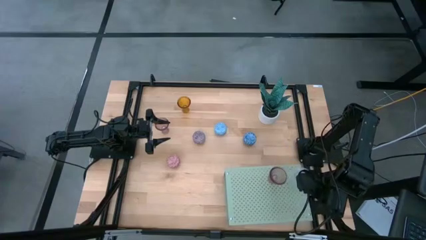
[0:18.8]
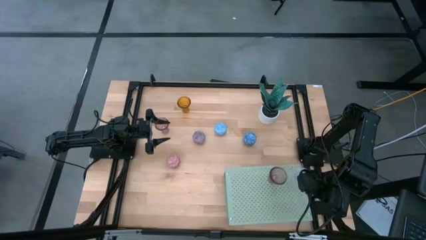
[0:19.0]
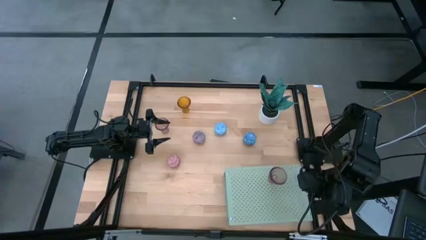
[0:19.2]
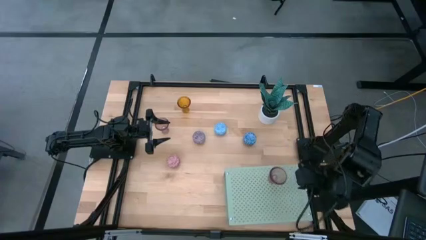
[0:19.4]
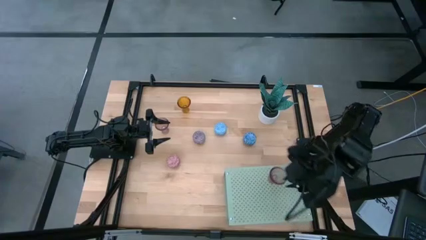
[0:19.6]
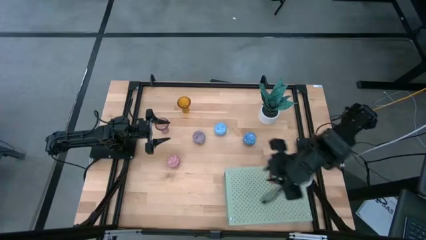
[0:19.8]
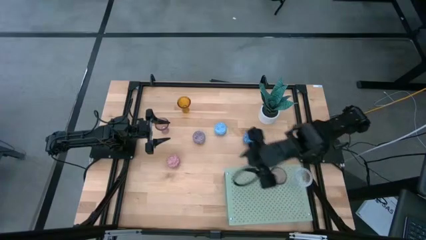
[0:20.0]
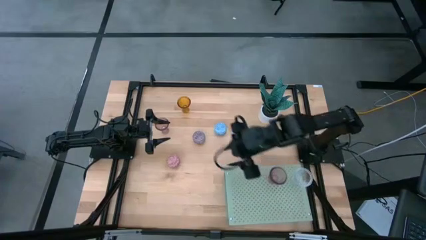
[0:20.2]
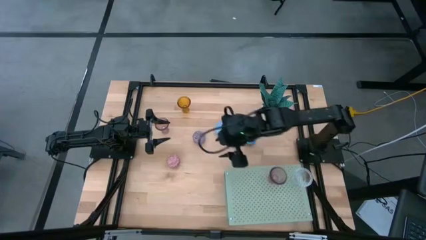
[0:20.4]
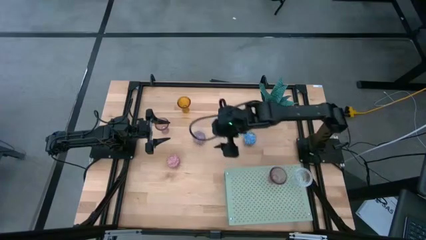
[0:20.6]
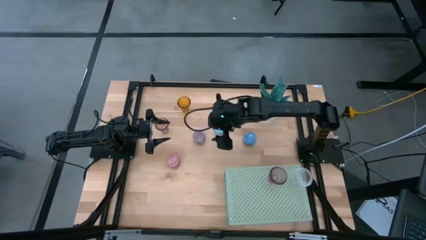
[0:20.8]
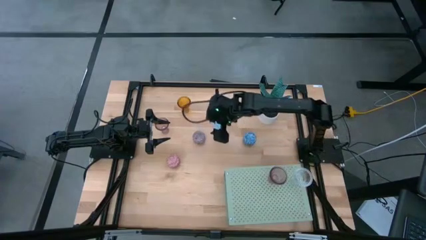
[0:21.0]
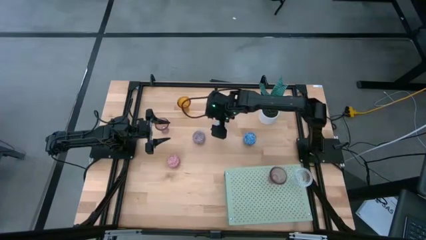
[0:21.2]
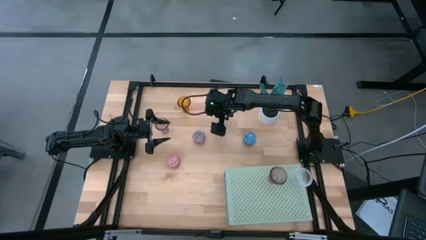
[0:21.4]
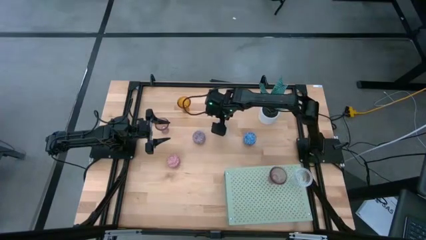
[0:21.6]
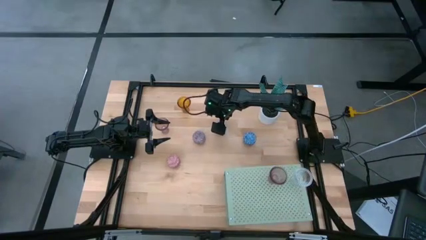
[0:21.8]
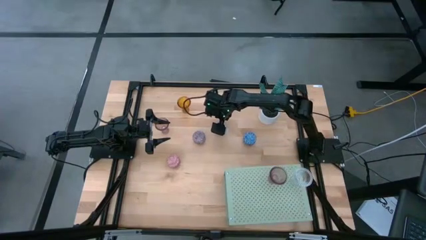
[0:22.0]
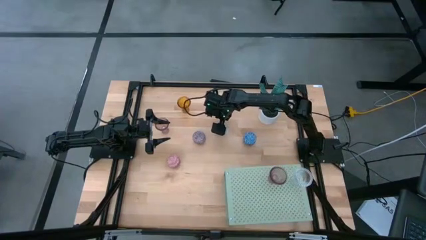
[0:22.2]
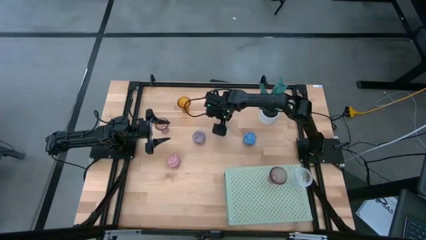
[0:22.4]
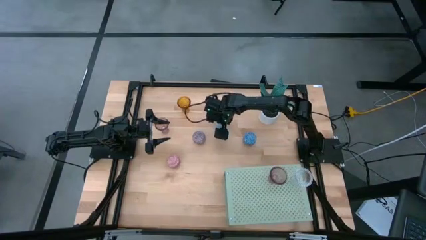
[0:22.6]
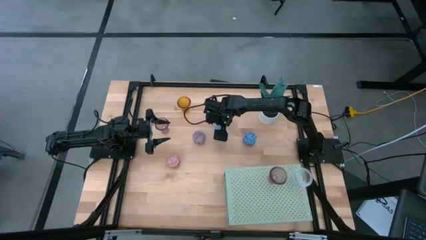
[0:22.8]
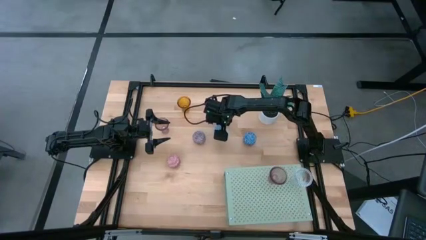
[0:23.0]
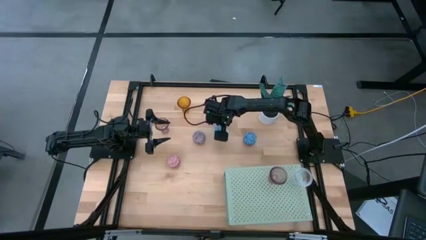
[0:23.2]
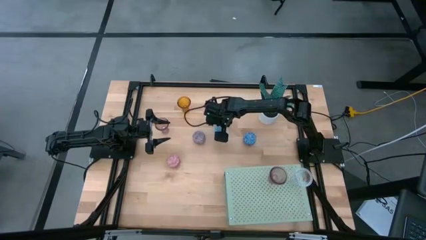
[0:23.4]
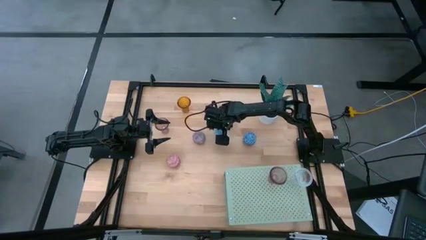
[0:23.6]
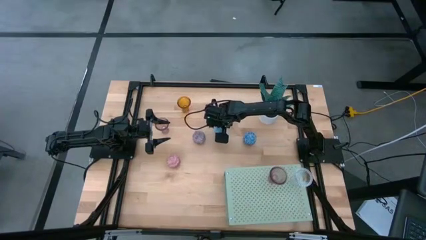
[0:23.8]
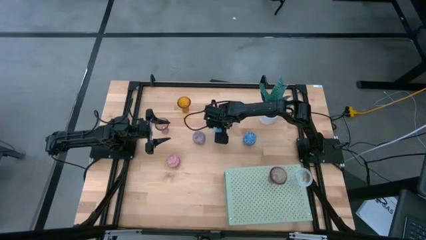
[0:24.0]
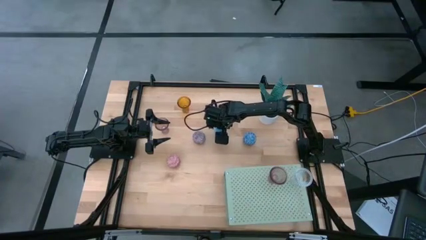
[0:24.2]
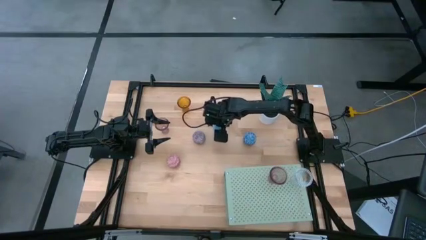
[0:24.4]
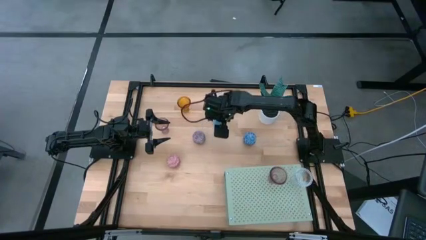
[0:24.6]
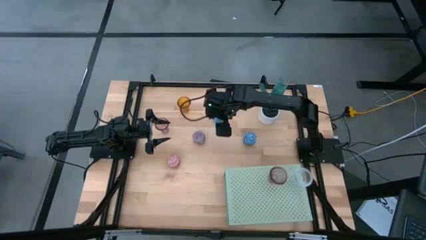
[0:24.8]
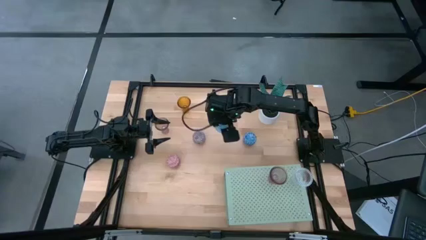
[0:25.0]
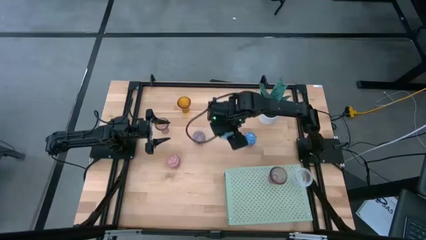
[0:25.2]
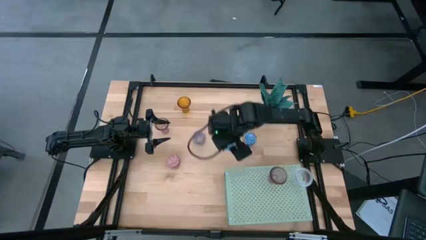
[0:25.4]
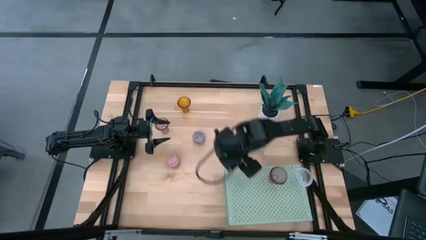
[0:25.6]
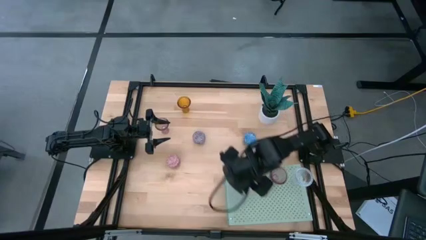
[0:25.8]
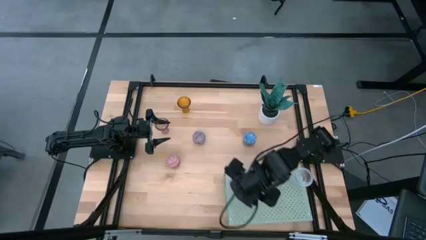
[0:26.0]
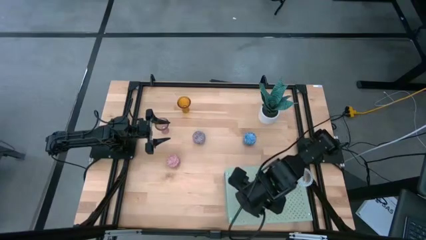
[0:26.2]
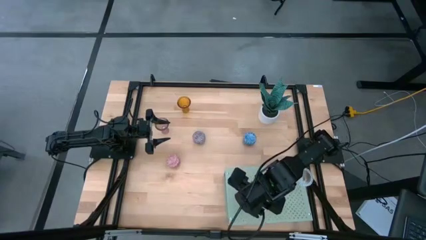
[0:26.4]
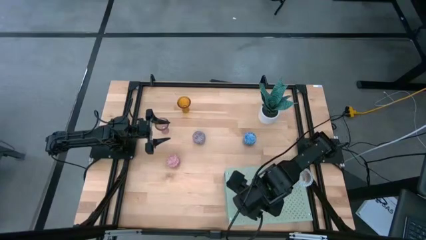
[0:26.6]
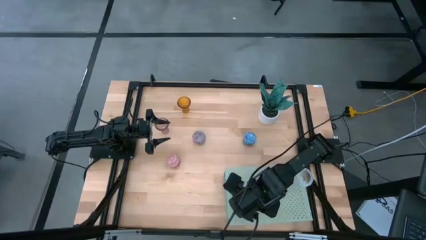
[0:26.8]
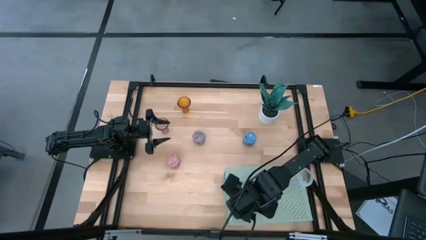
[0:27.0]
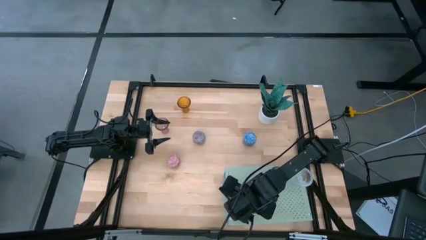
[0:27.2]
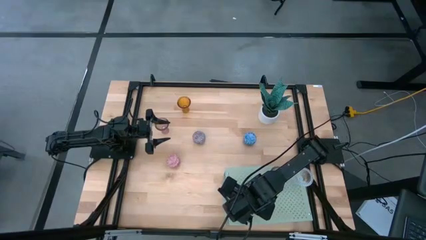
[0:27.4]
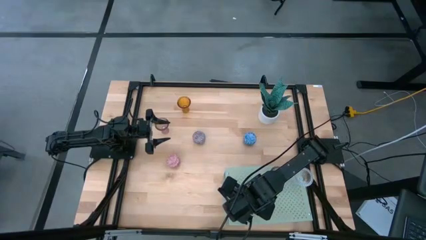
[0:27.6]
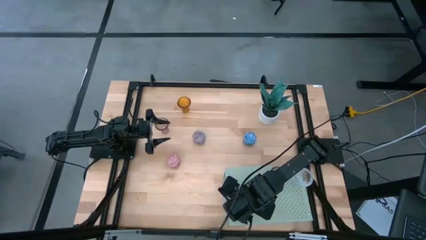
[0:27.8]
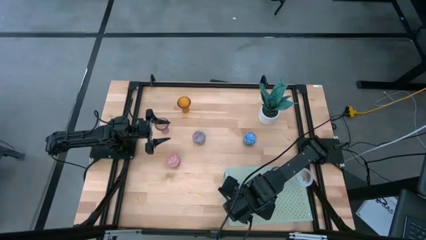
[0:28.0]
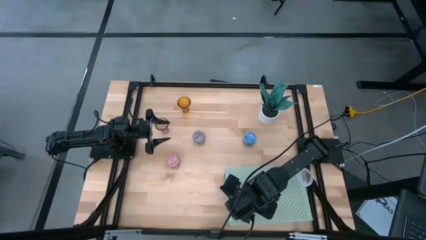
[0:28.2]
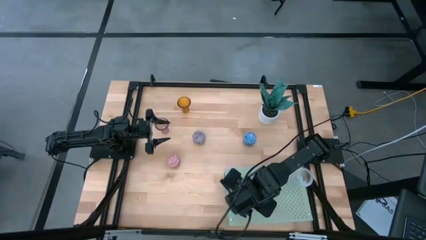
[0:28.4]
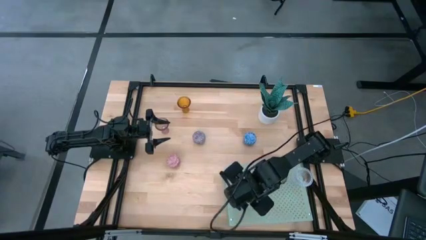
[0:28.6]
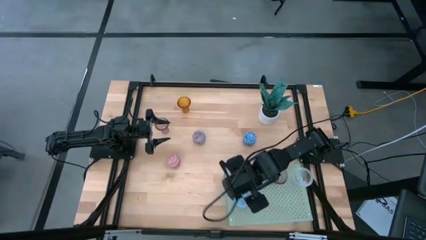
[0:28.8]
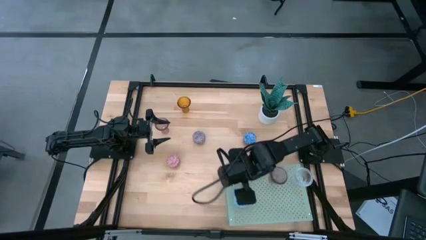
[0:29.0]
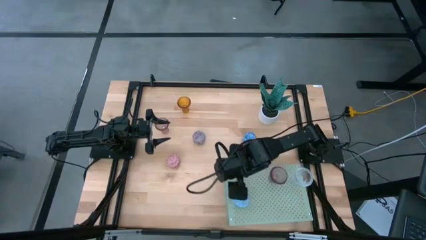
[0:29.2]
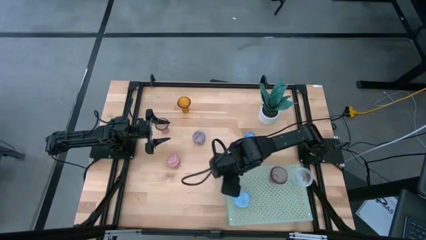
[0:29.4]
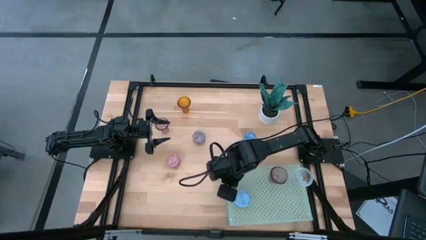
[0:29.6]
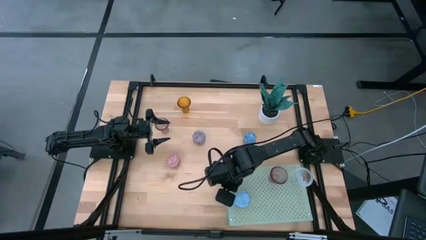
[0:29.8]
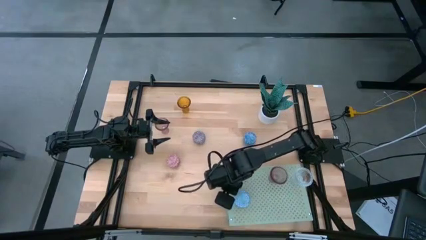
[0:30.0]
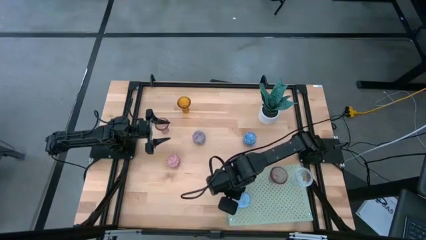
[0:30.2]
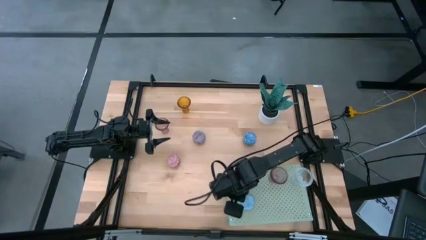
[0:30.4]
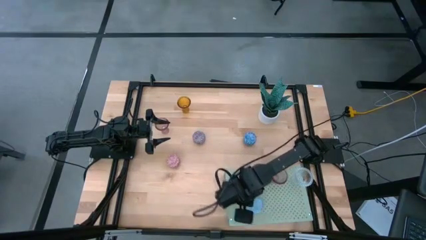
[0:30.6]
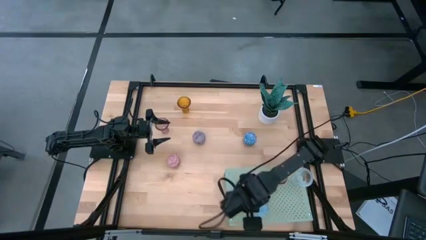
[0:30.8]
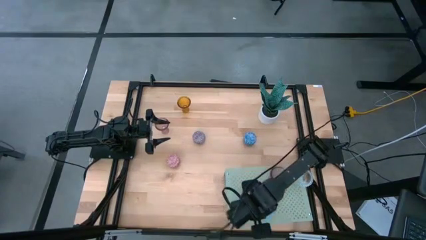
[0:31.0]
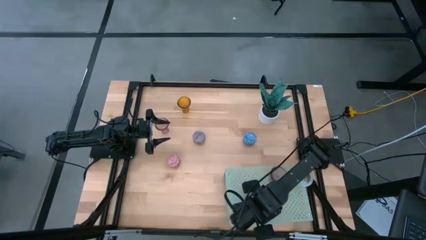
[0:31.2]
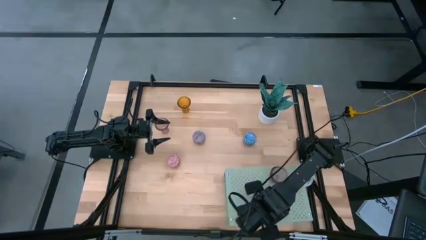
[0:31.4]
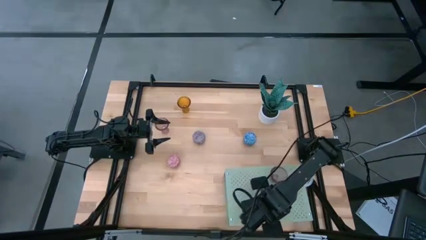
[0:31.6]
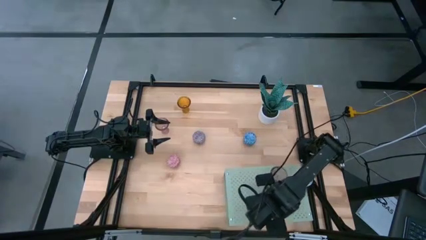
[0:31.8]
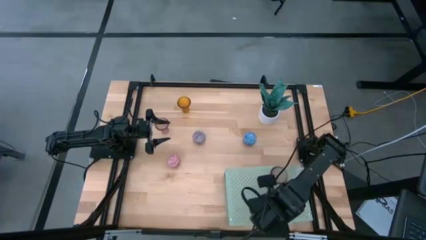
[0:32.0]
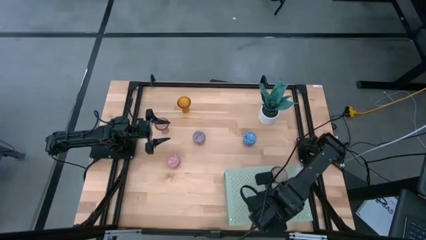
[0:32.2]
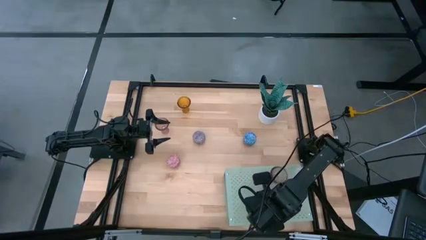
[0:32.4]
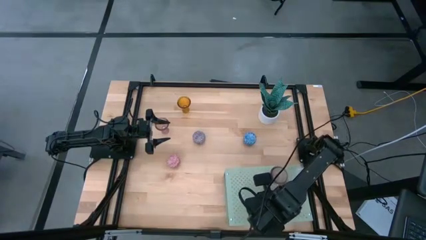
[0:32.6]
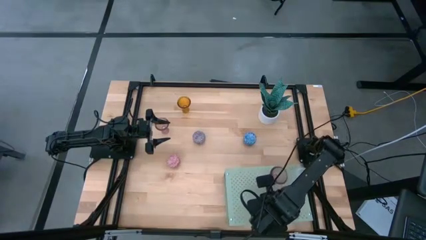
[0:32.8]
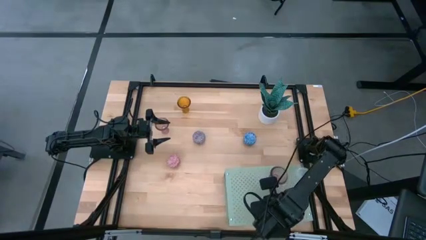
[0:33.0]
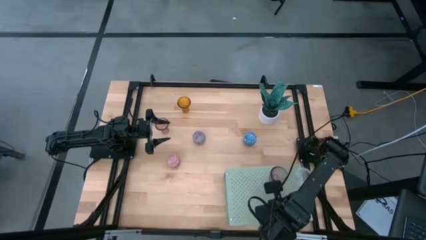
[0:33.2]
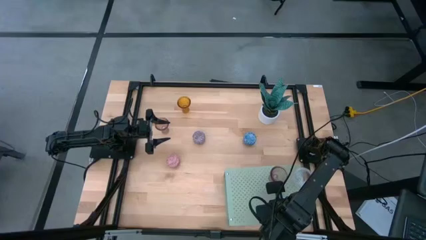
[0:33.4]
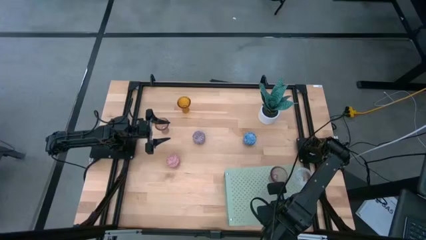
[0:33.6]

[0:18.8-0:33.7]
Task: Pick & Place candle stick holders
Put the light blue scented candle on the shelf

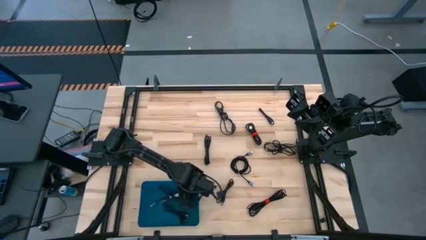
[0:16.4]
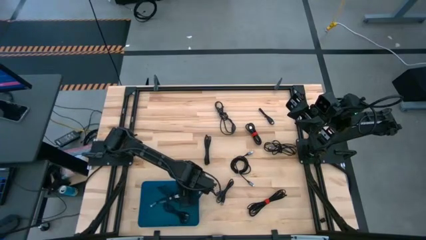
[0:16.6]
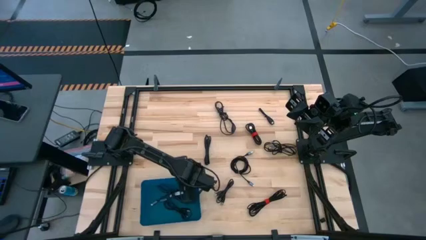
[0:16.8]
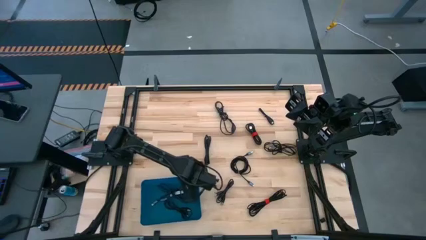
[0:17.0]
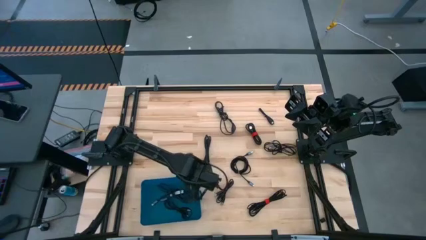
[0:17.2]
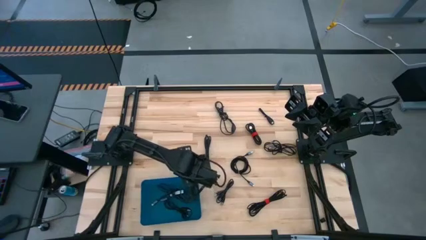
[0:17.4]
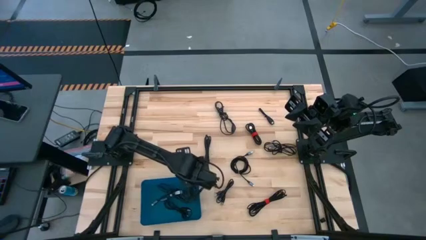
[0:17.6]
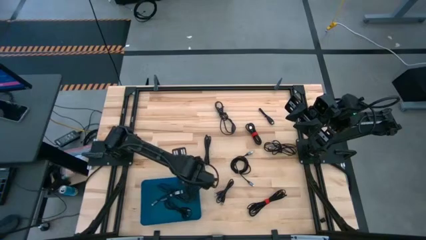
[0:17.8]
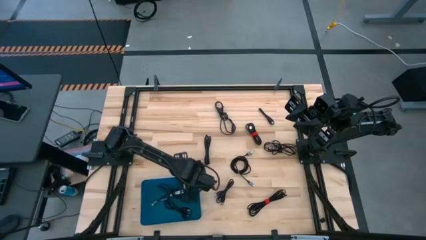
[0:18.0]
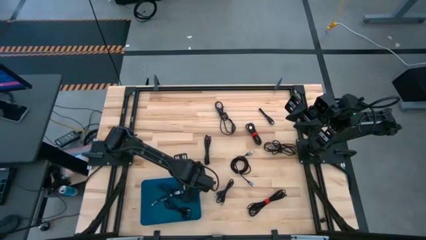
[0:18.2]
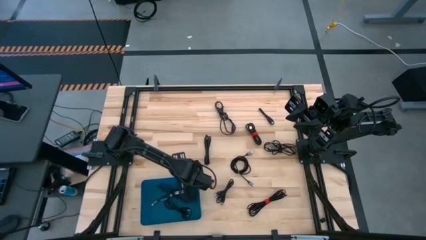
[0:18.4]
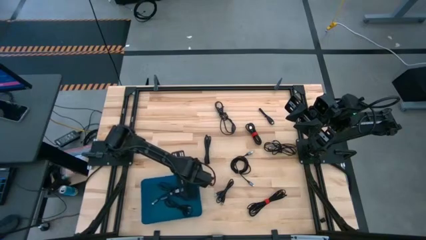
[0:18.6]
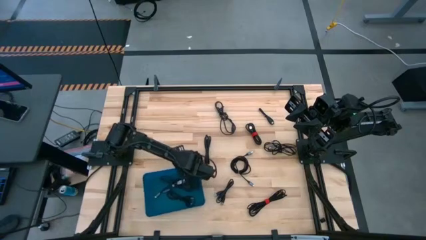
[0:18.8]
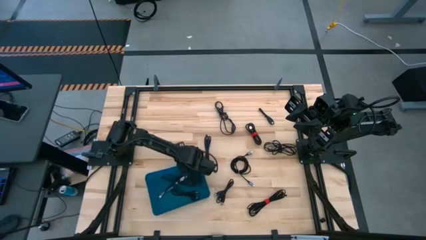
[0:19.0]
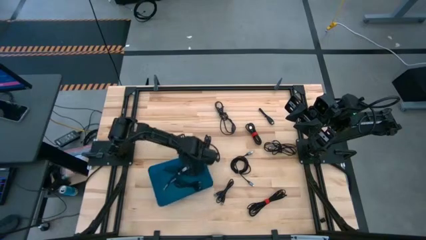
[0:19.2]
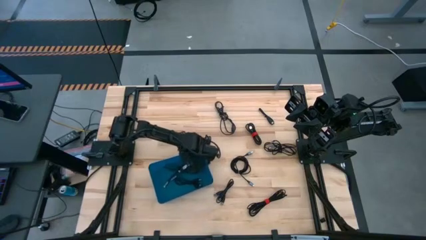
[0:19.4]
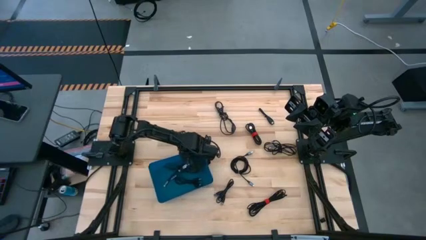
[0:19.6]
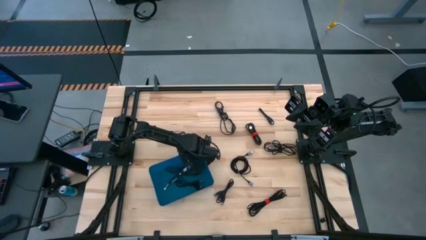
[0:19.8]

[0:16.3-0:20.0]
Task: Pick and place USB-C Cables
Adjust the blue bin
